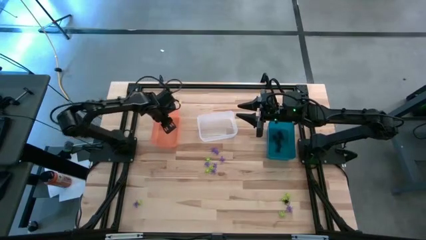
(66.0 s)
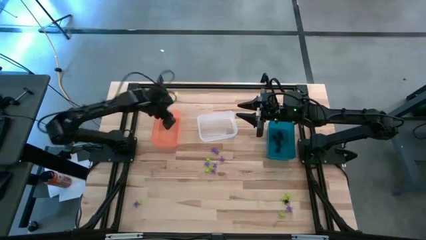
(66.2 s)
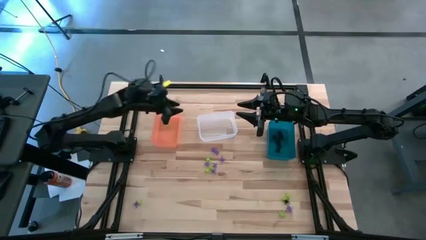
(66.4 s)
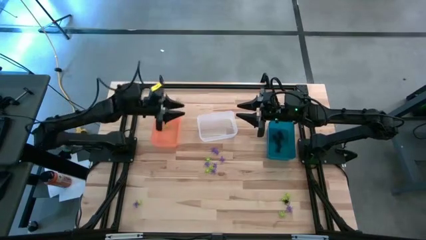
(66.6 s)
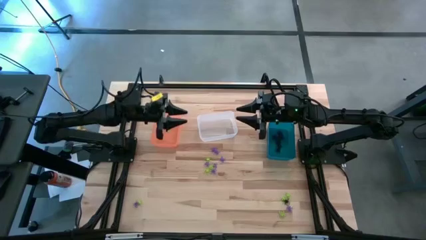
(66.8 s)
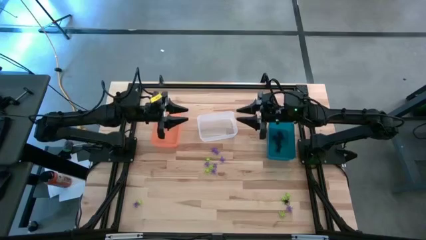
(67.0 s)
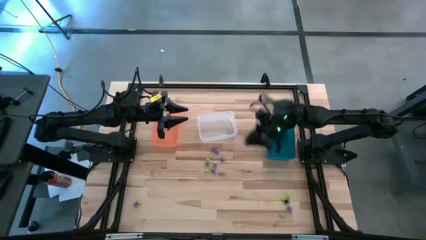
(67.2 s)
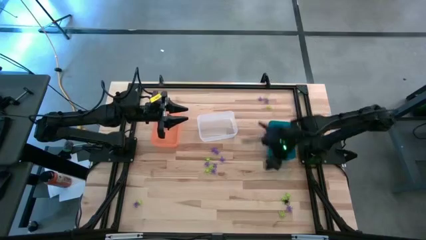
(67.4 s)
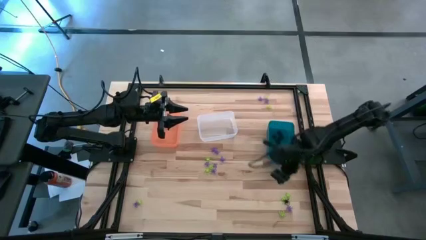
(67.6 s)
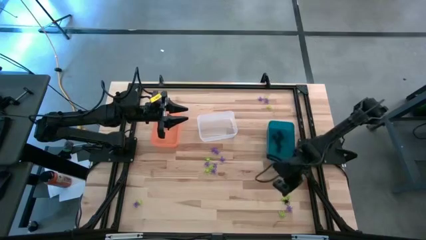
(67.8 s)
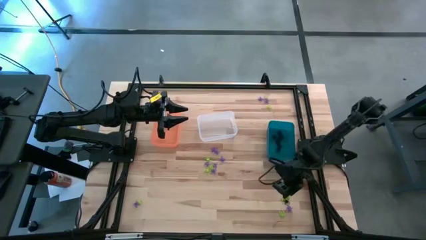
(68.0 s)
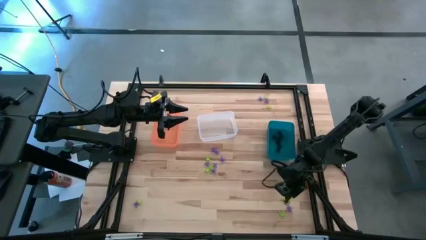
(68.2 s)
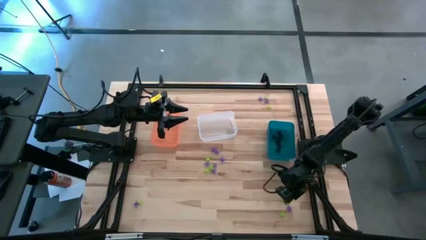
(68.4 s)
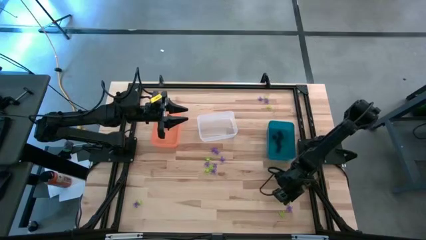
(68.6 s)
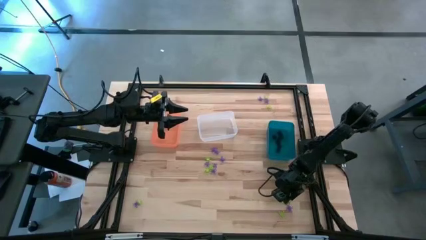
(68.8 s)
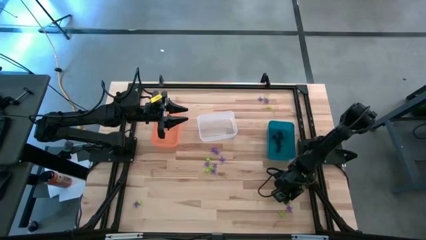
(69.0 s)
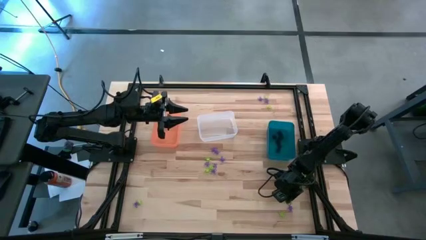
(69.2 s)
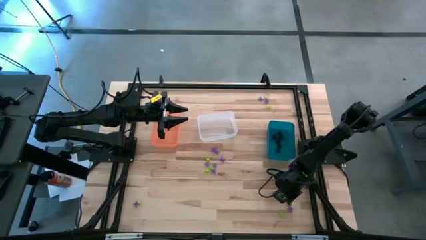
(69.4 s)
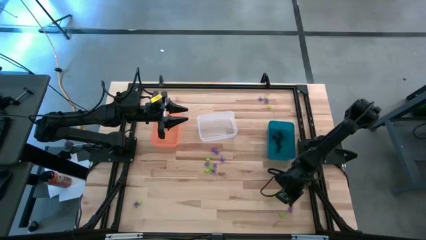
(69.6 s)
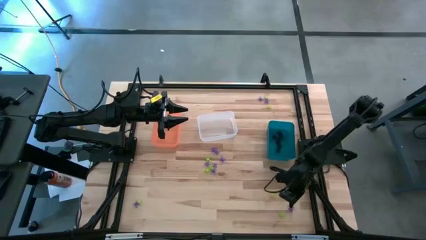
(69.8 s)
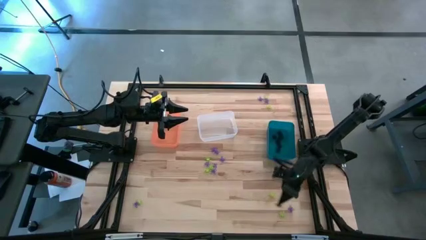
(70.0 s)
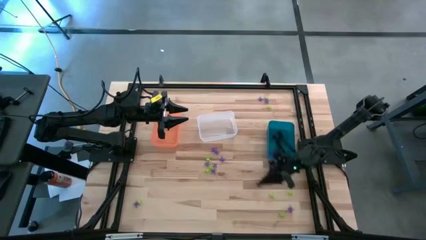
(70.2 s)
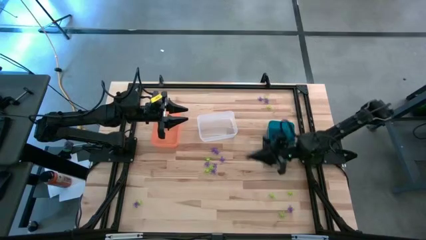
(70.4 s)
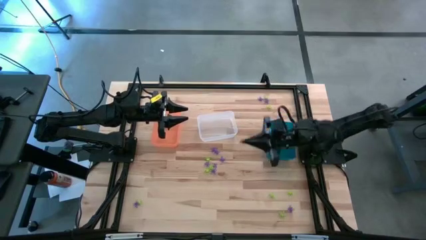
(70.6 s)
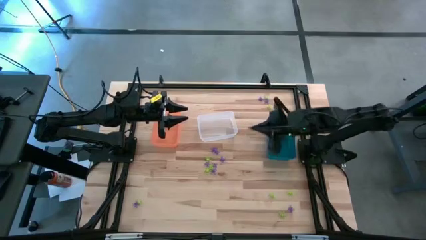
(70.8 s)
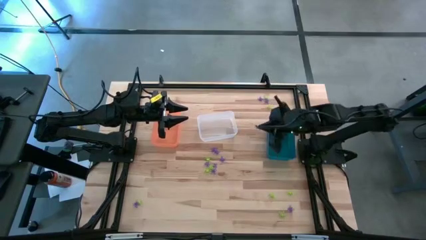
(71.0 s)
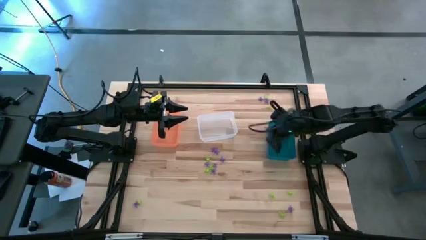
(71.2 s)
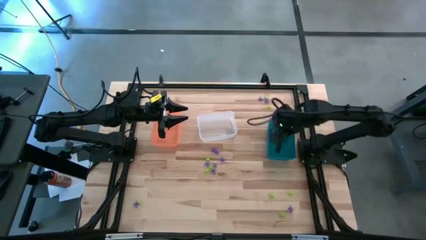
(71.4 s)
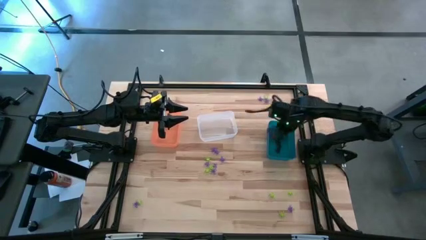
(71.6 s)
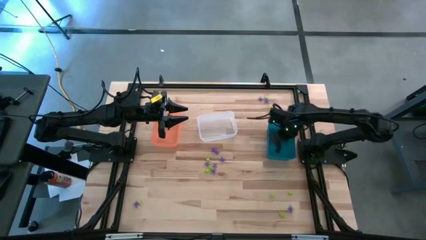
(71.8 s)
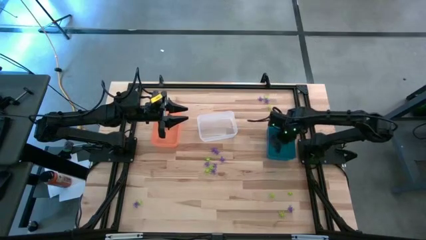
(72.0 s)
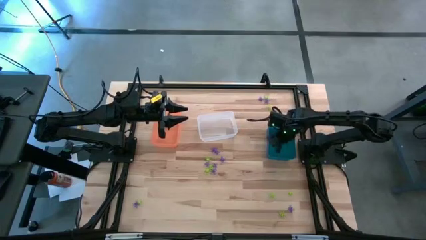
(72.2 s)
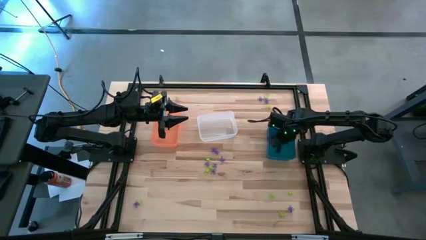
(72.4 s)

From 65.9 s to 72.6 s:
Task: Sort Halloween decoration
Put the black spider toy into the blue bin

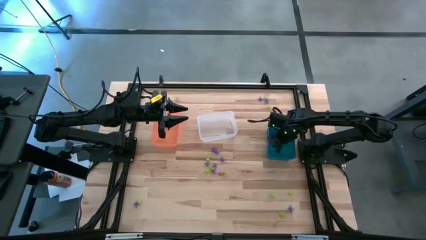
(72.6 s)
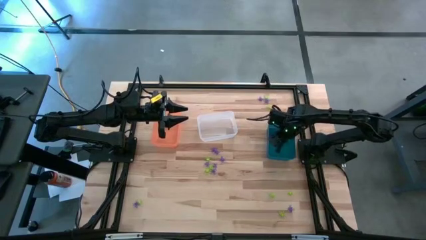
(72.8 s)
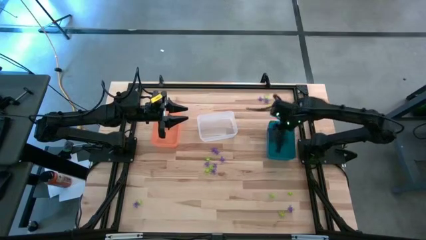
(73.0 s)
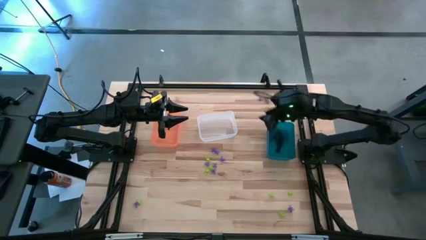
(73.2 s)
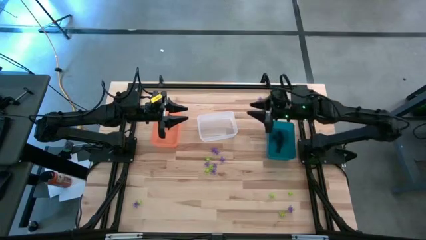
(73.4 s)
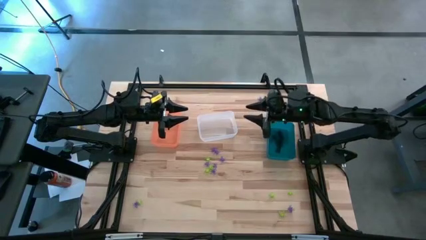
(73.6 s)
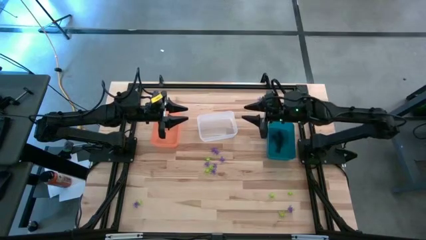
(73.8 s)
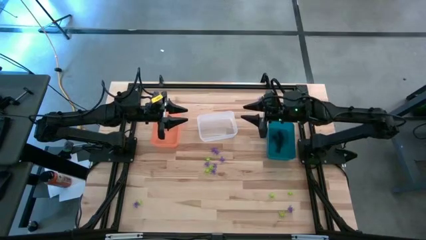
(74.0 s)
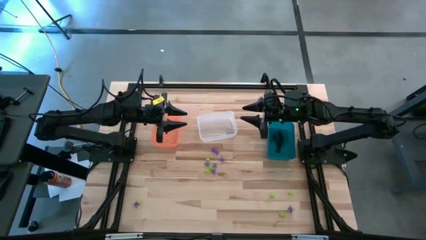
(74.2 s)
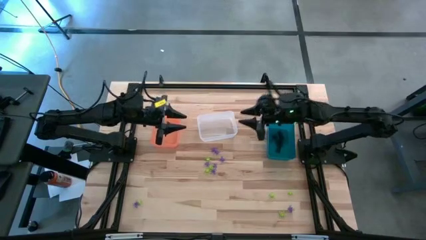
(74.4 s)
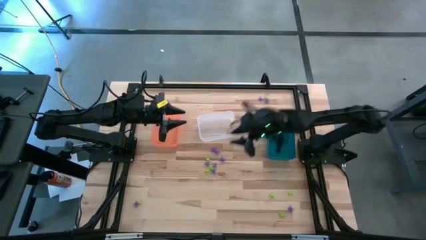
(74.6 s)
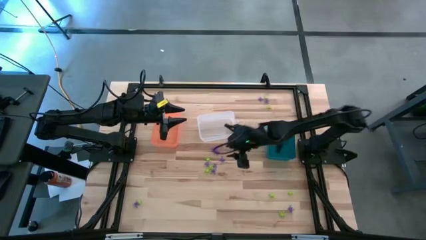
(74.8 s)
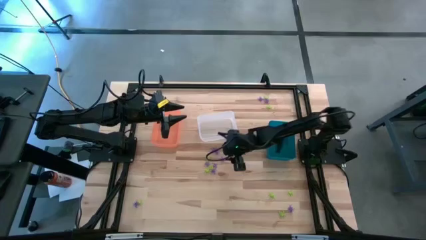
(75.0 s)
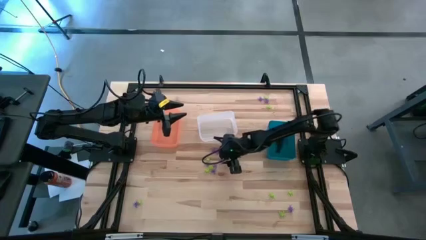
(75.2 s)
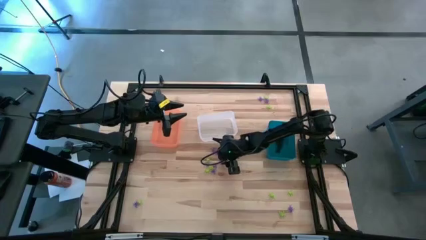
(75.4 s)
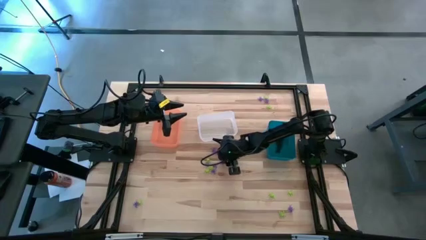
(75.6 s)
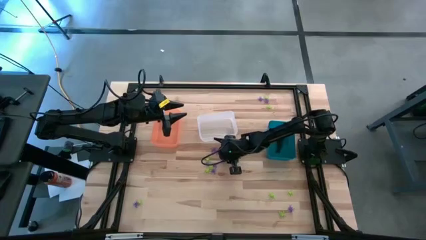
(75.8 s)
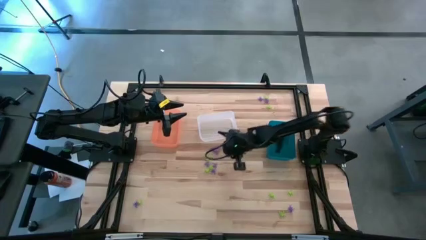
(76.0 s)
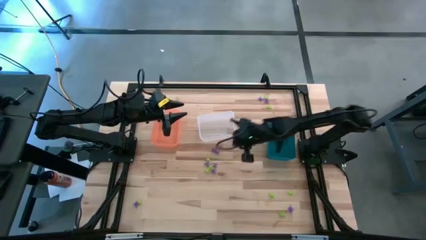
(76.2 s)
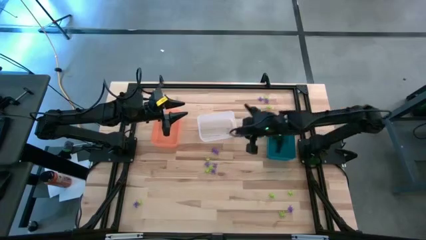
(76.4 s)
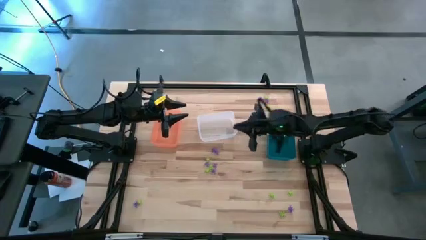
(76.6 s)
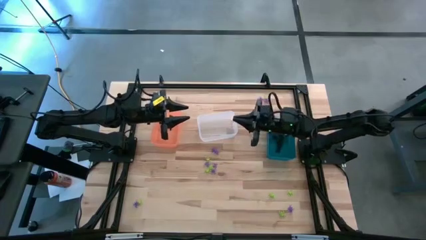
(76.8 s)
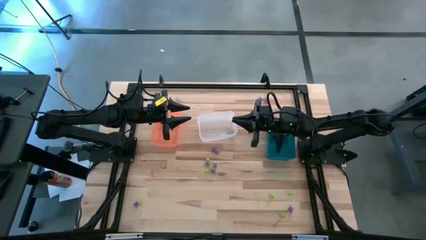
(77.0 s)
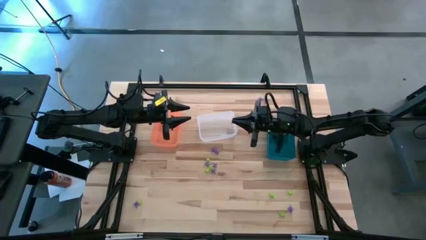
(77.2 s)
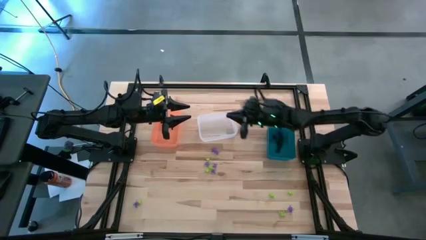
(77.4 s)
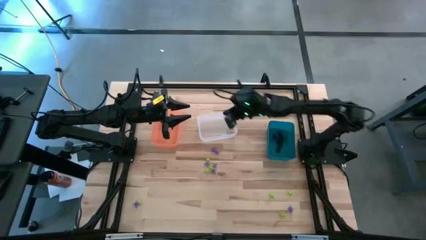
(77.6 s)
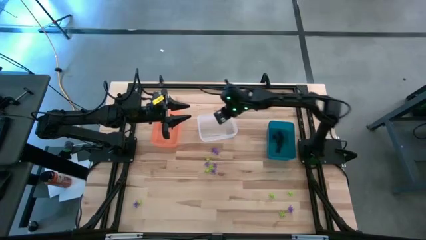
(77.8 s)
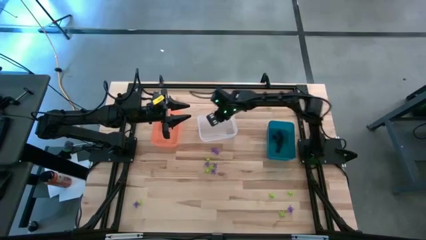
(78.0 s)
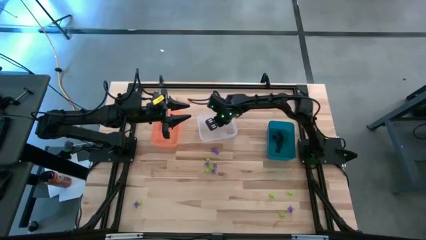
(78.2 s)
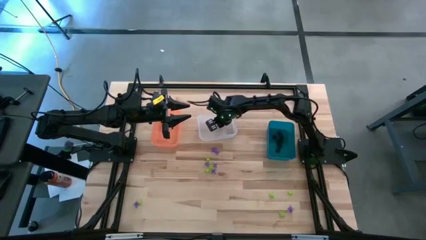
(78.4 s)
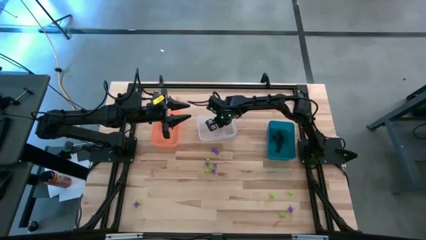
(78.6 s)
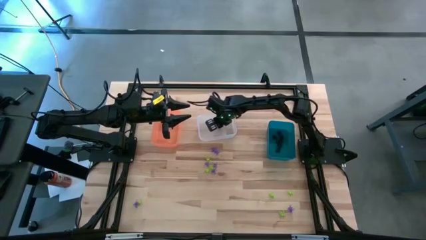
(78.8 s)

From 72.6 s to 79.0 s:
Put the purple spider toy into the white bin

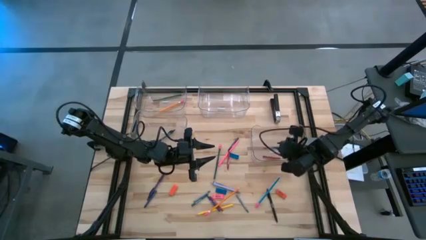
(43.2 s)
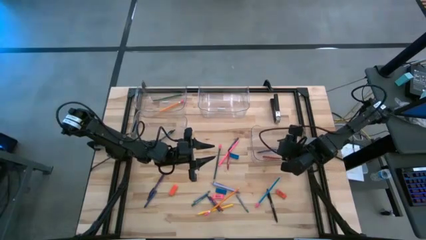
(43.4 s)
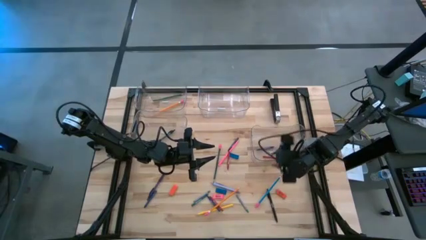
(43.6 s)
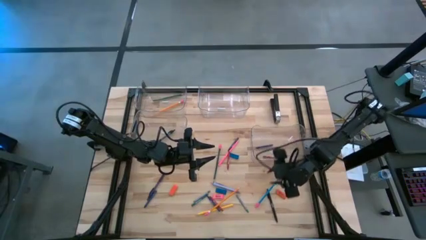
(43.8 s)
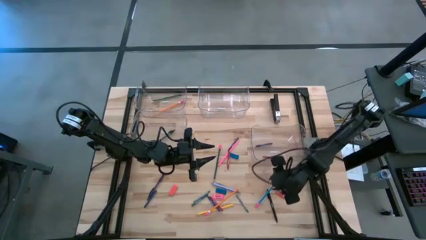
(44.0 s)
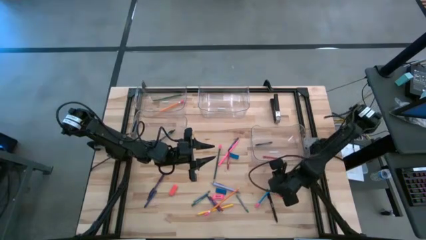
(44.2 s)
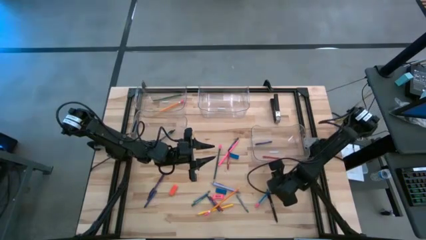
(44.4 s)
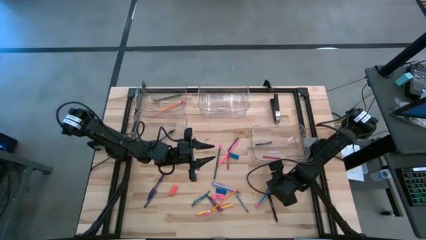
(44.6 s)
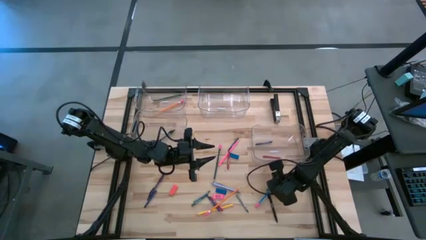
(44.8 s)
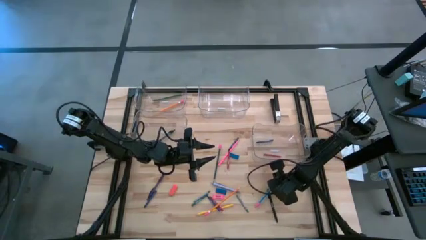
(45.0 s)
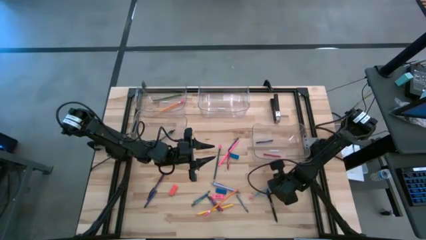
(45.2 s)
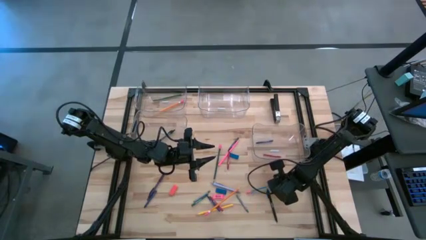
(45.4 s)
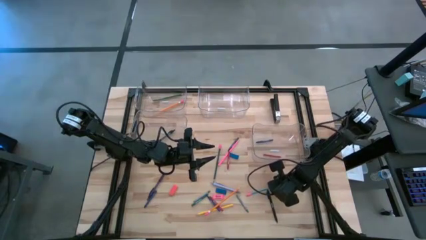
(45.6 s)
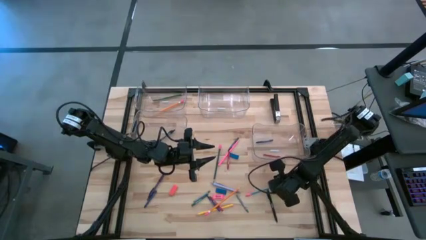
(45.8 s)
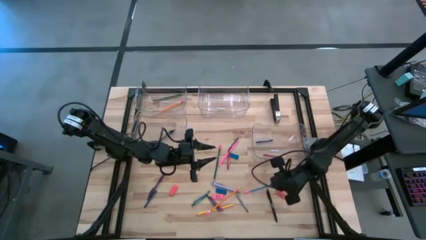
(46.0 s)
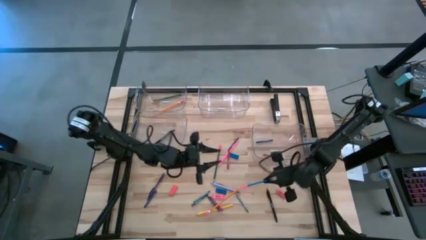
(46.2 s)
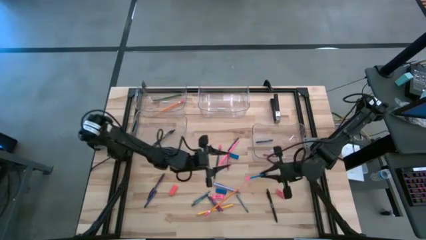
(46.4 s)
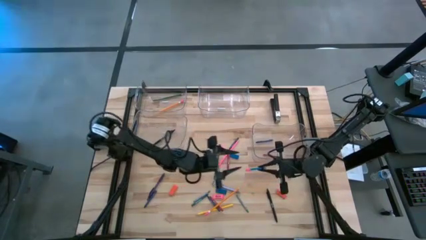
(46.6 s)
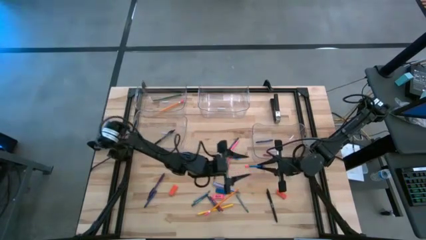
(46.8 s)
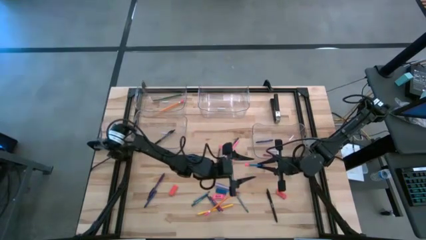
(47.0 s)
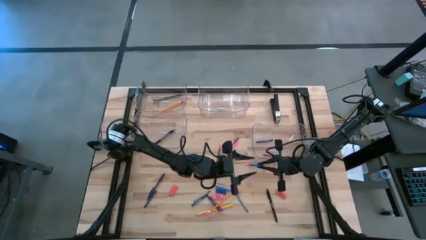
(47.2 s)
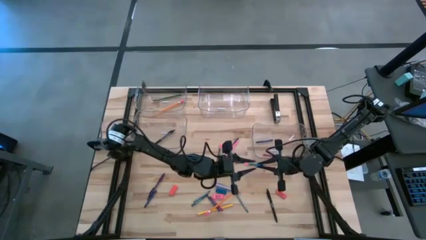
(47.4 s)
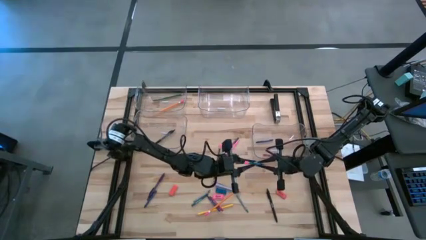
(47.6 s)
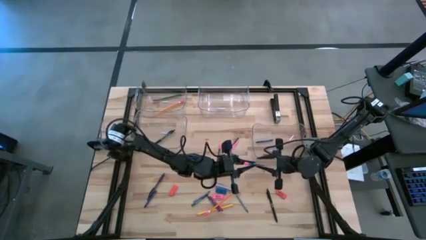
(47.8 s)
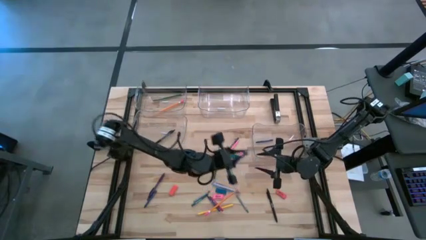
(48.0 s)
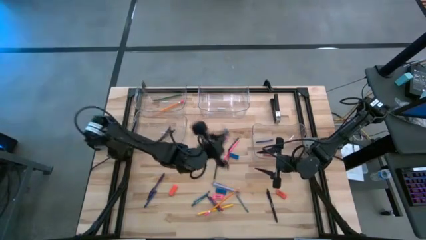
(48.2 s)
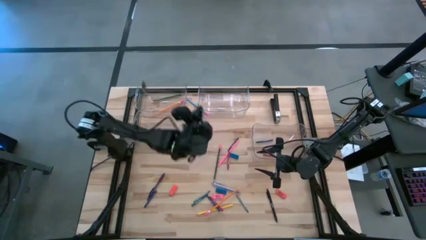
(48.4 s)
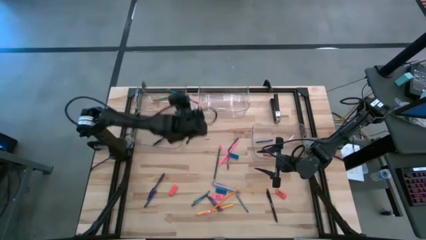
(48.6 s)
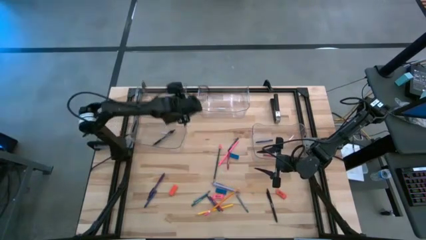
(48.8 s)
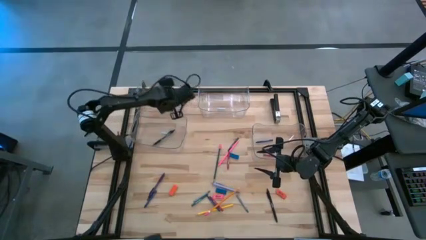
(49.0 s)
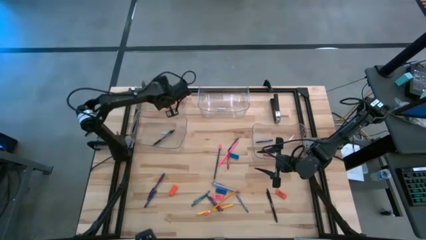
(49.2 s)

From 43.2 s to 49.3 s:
Task: Sort crayons/erasers/pens/pencils in bins
Put the blue pencil into the top left transparent bin
